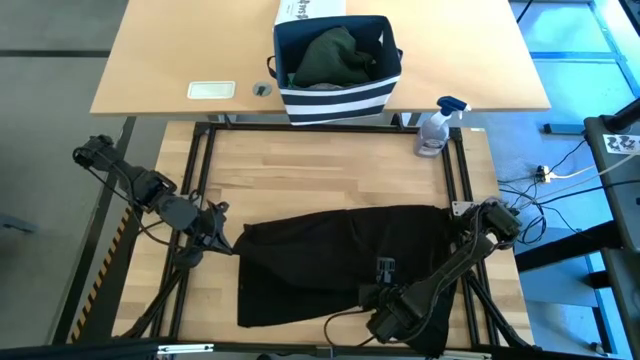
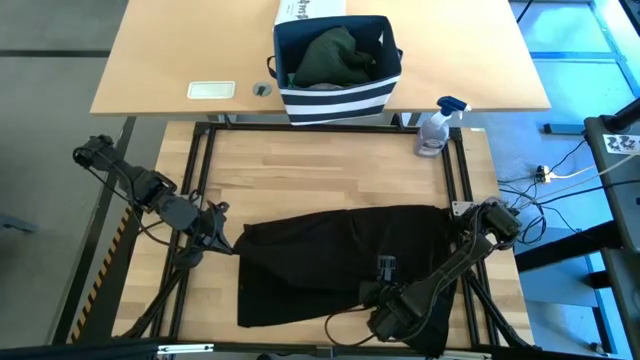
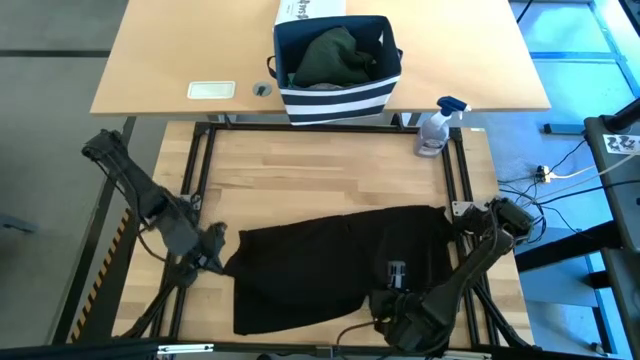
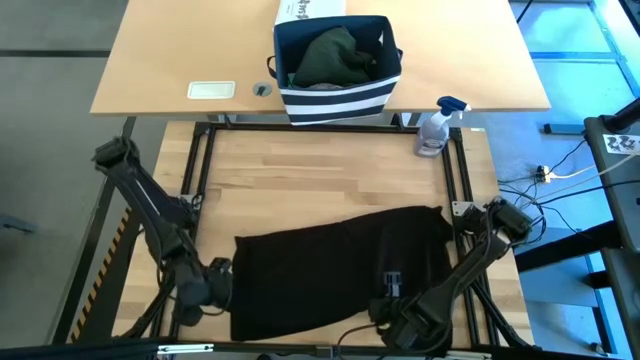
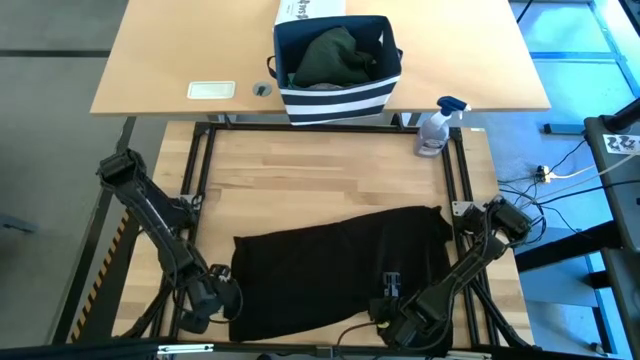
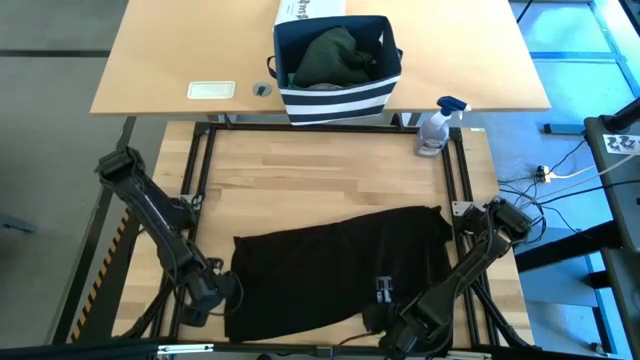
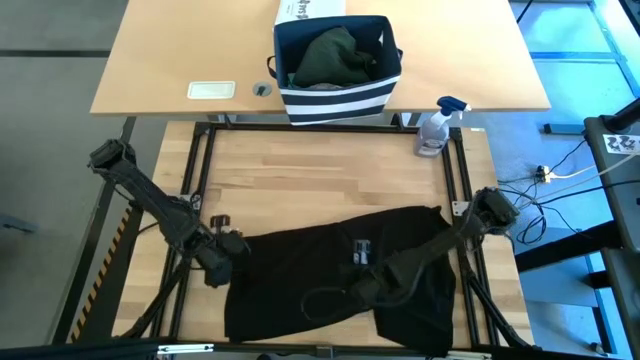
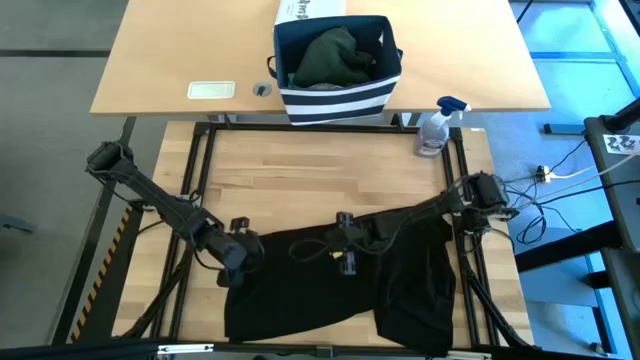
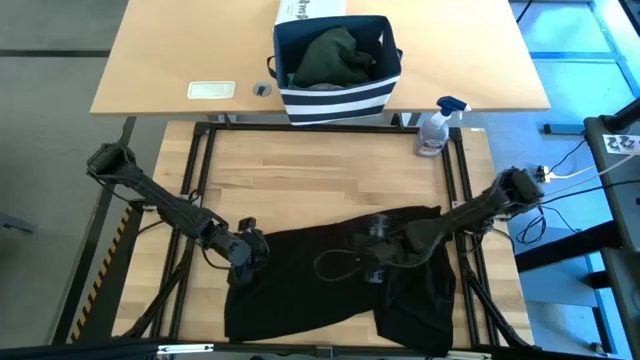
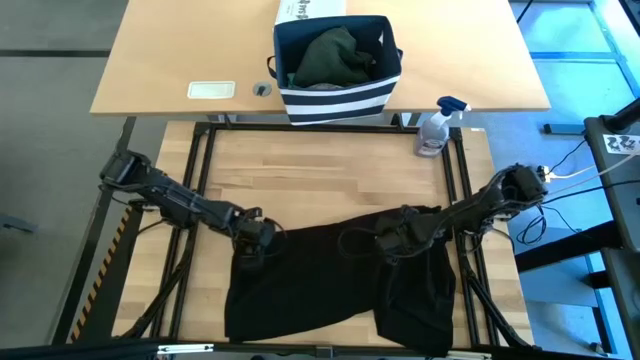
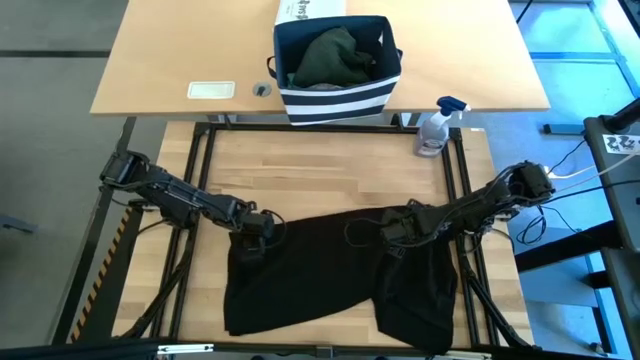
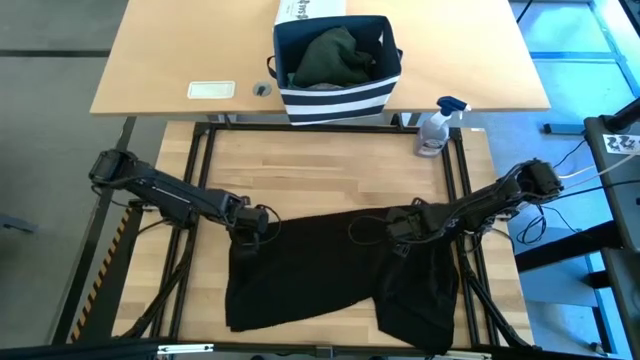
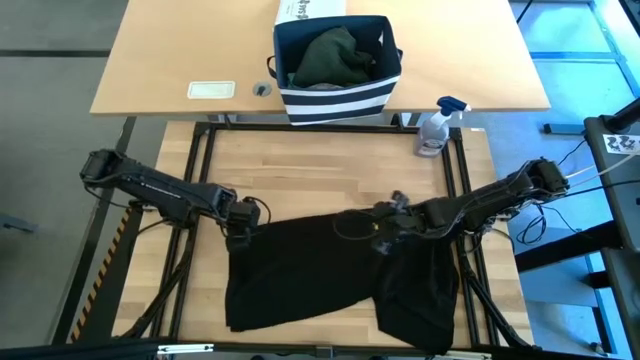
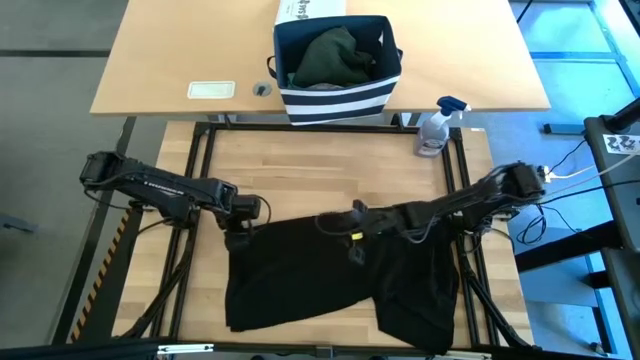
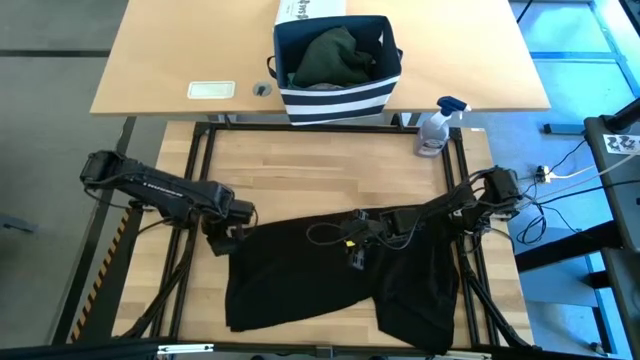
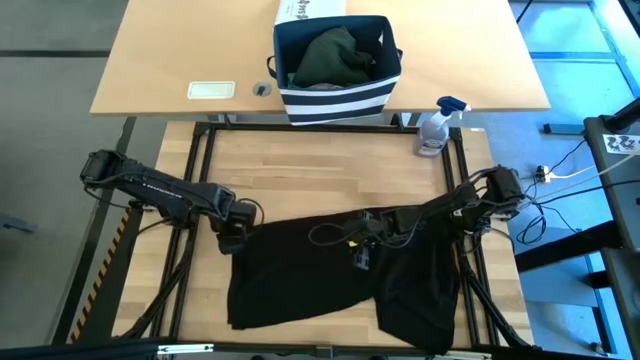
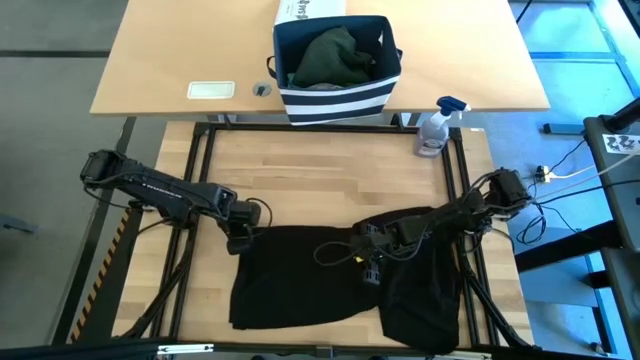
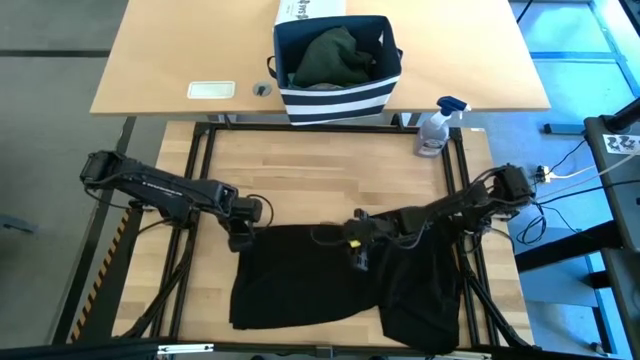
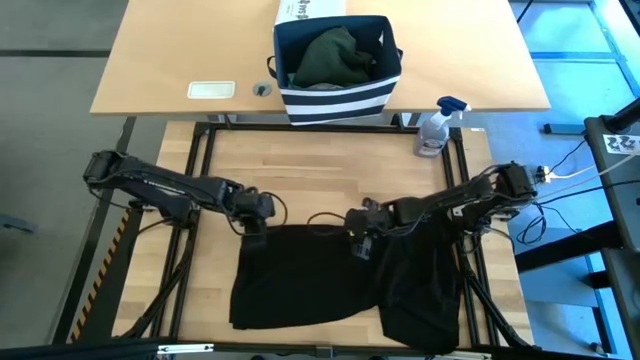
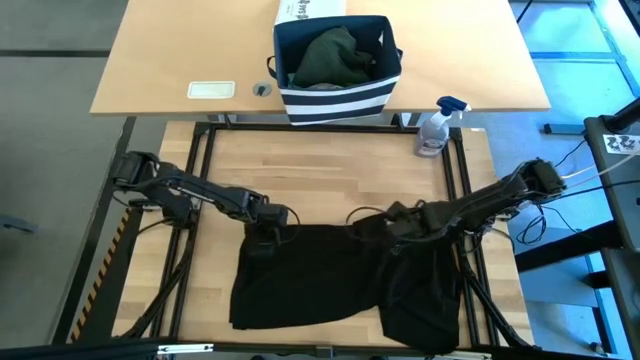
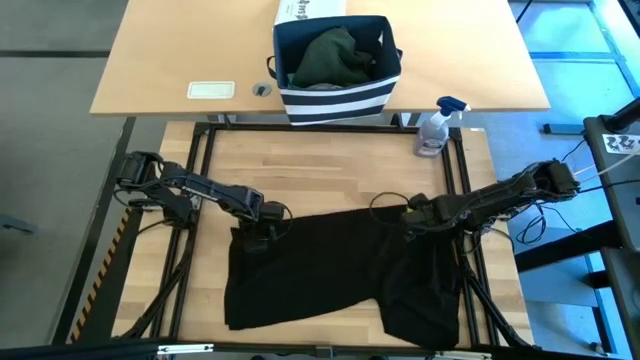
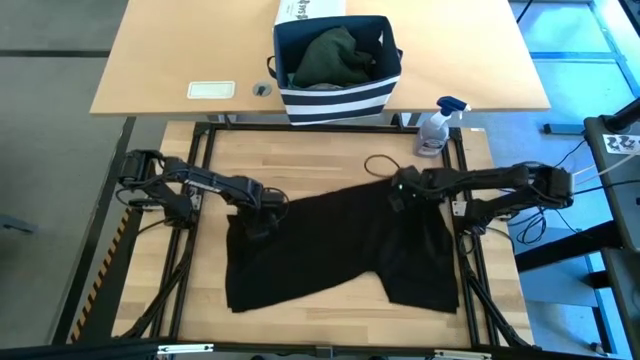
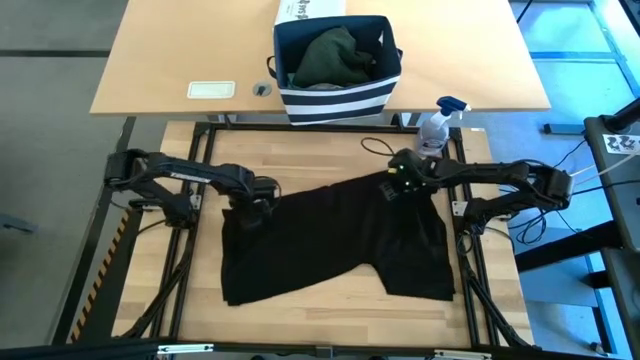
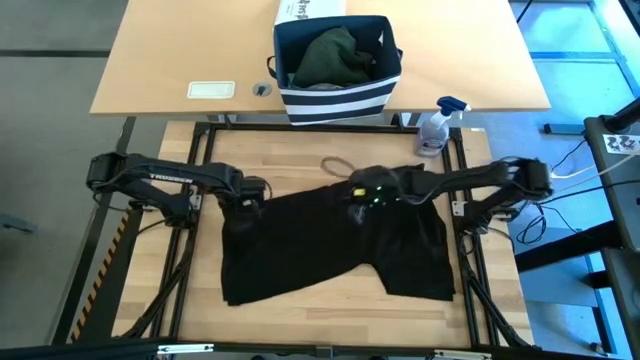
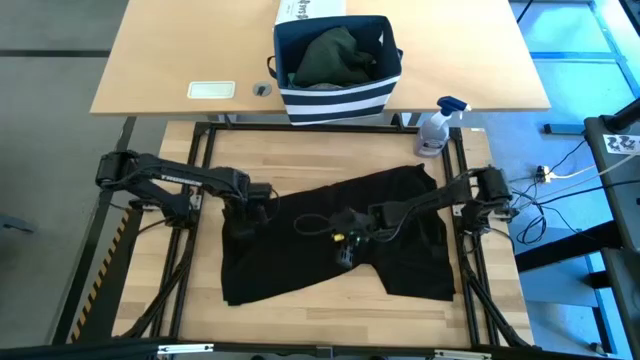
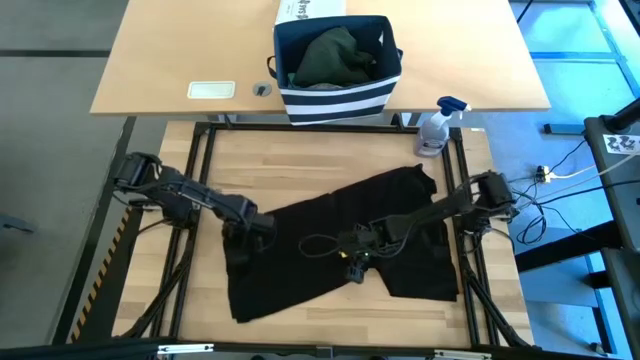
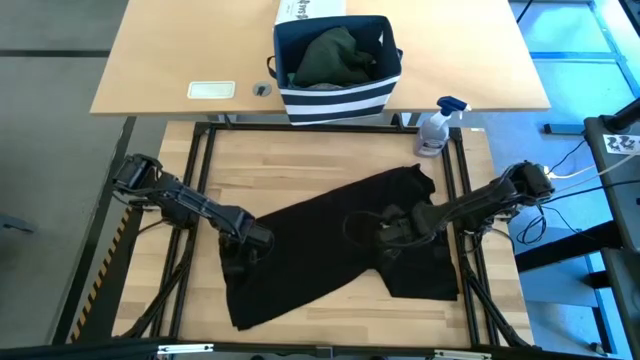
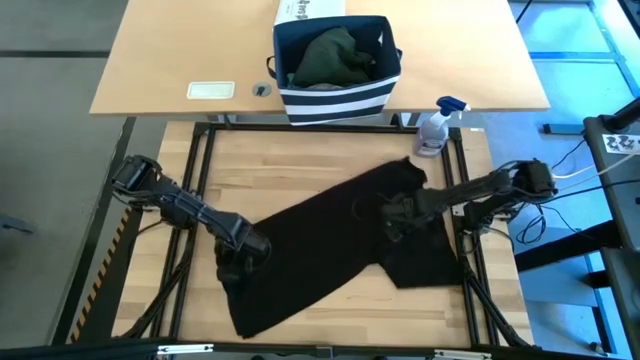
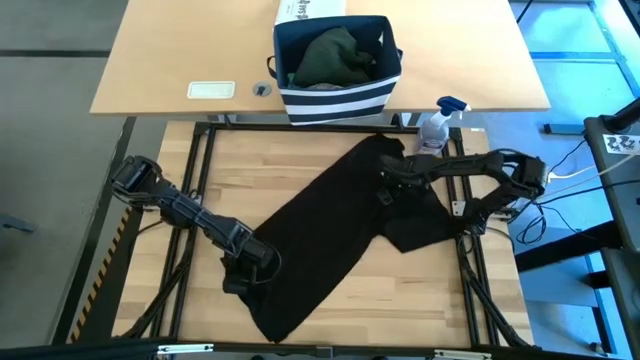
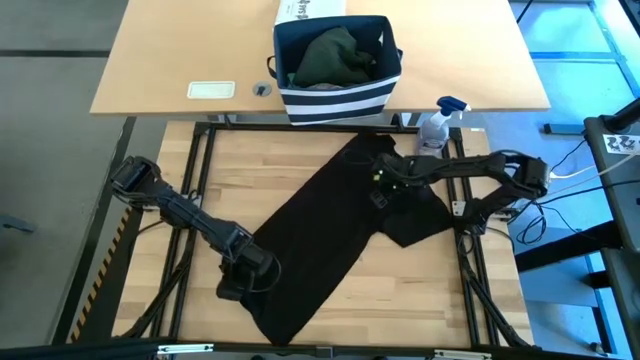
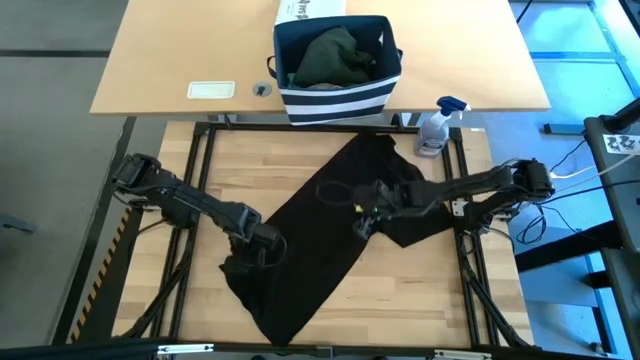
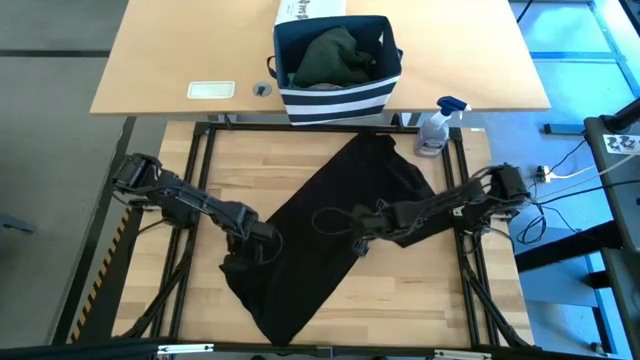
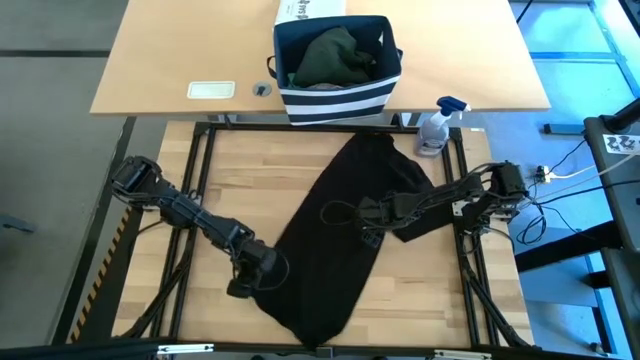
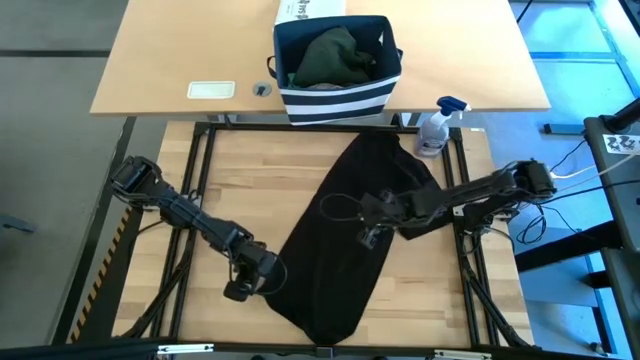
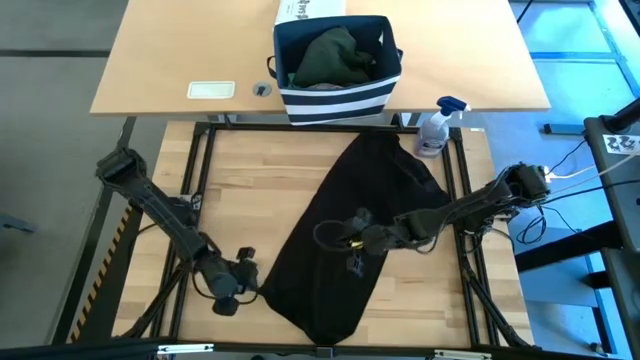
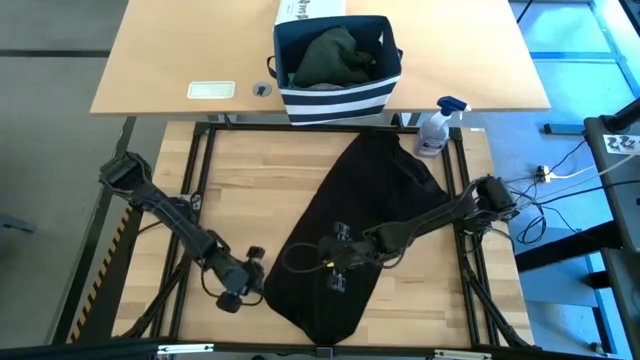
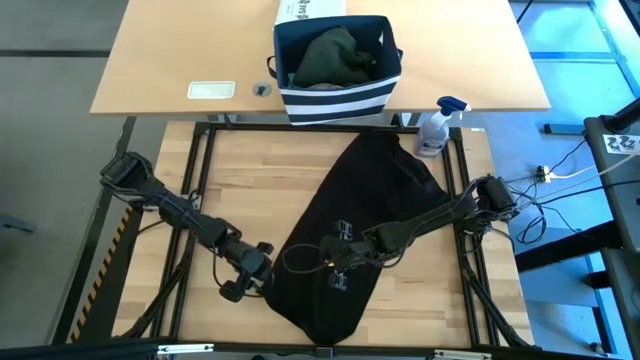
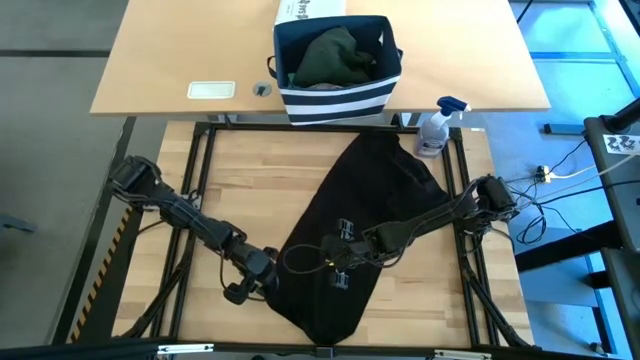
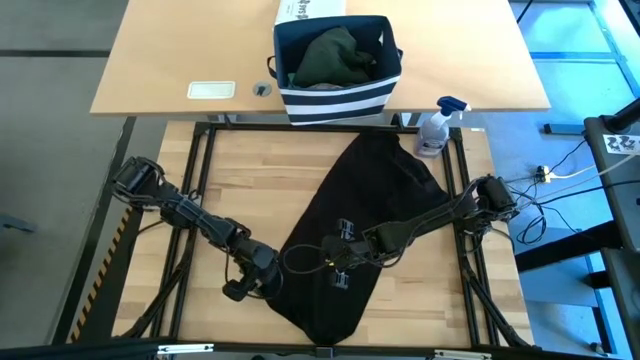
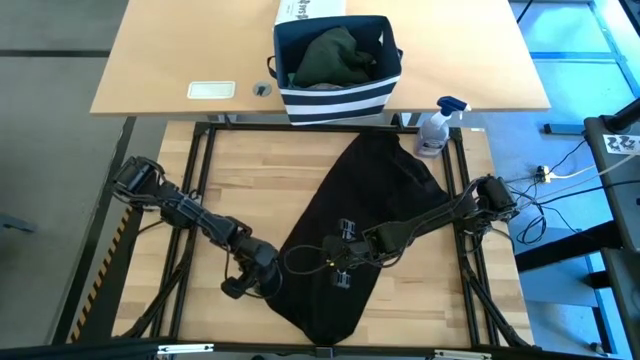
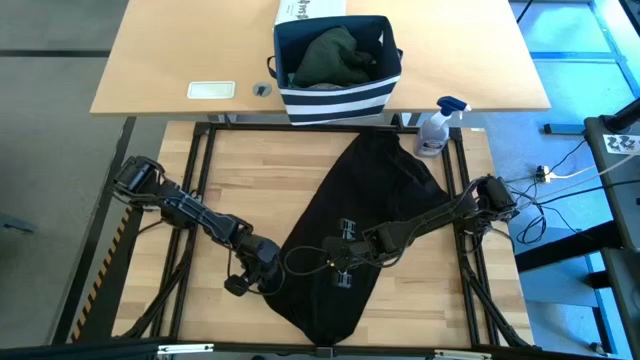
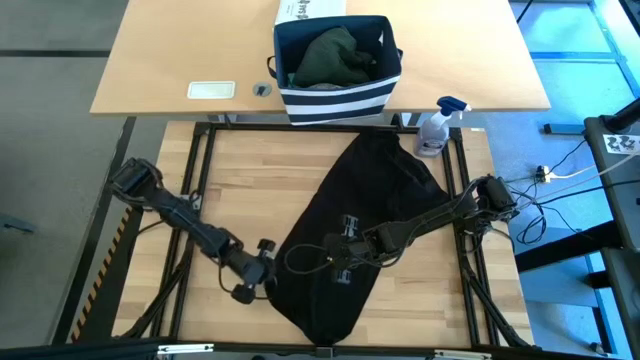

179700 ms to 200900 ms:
Task: Fold Laundry from Bin
Fold the black shirt
